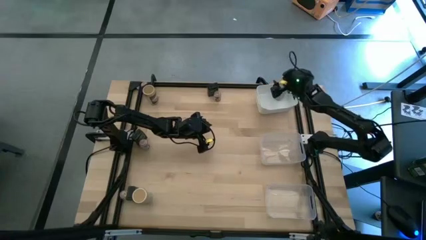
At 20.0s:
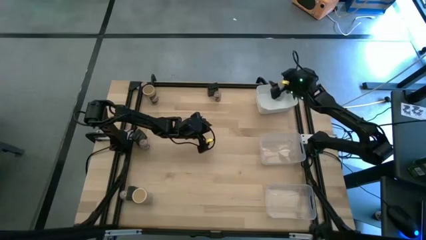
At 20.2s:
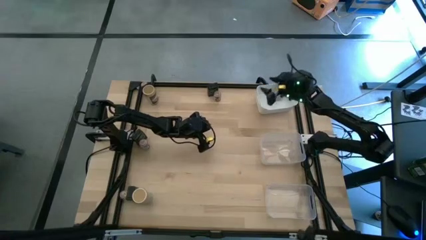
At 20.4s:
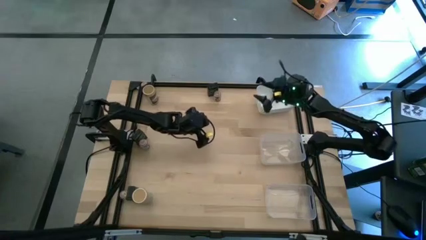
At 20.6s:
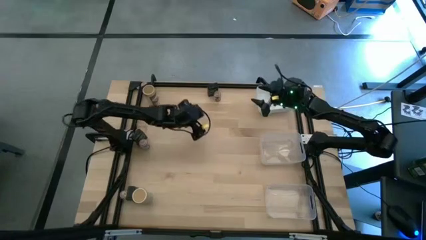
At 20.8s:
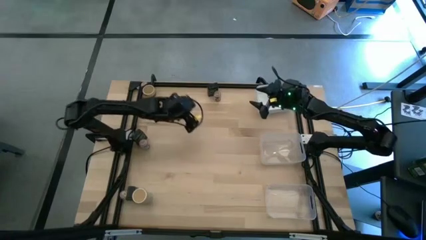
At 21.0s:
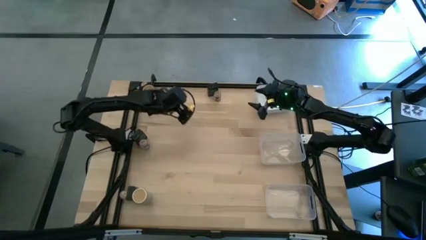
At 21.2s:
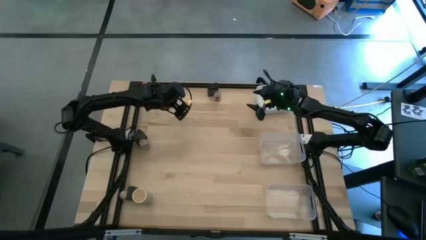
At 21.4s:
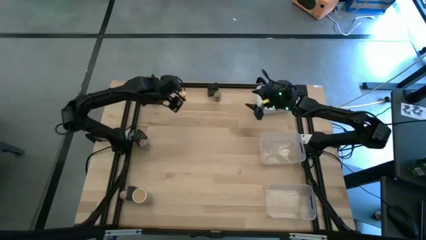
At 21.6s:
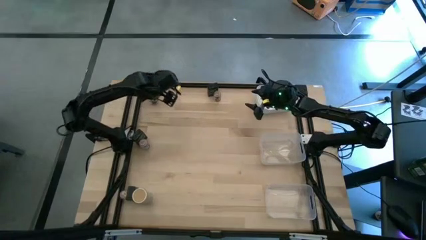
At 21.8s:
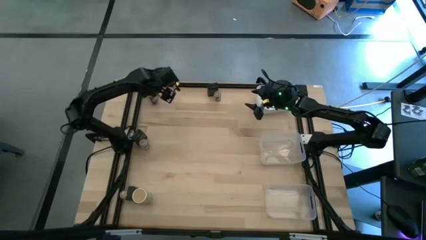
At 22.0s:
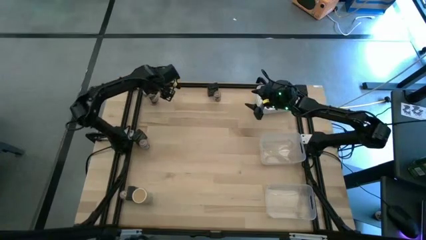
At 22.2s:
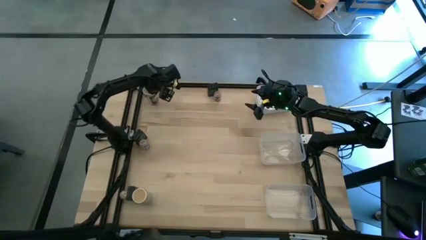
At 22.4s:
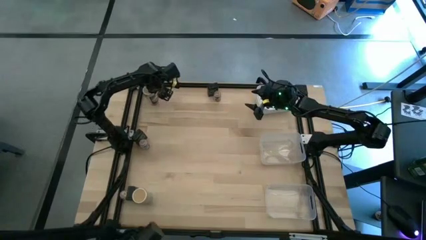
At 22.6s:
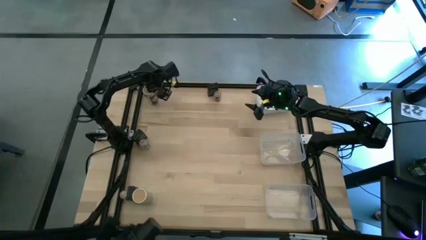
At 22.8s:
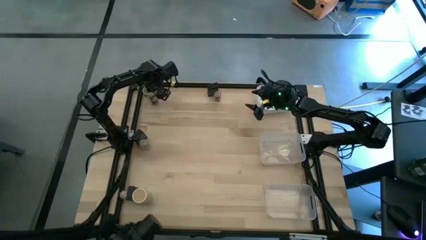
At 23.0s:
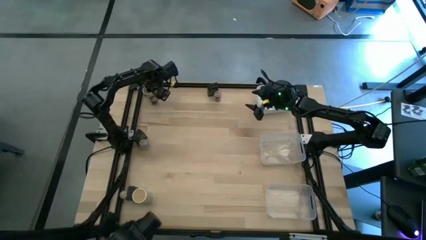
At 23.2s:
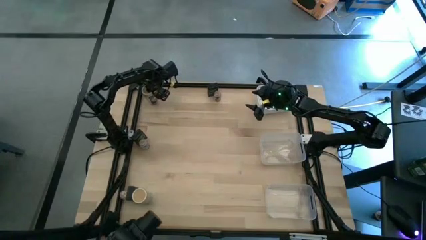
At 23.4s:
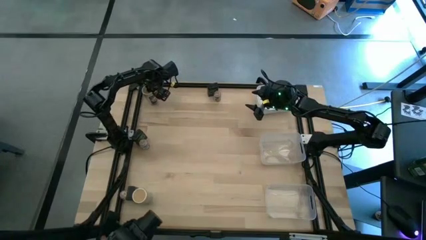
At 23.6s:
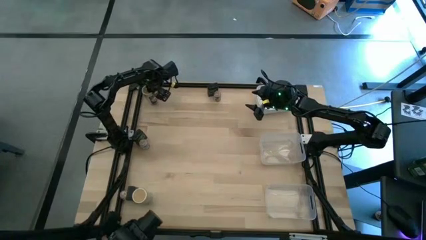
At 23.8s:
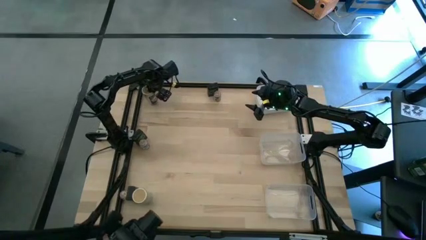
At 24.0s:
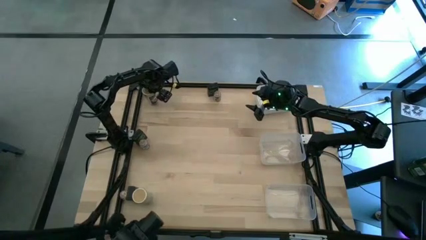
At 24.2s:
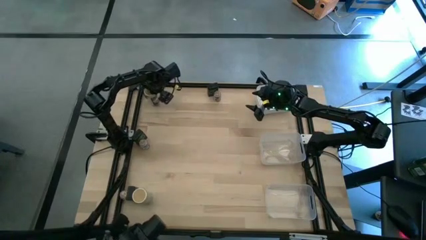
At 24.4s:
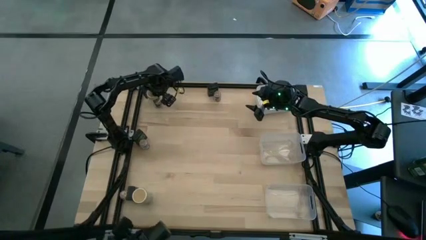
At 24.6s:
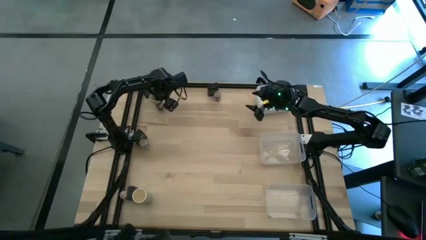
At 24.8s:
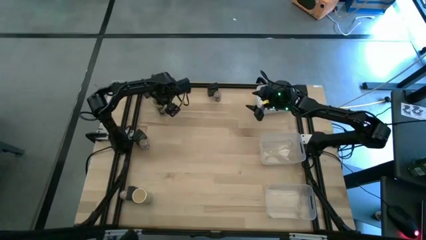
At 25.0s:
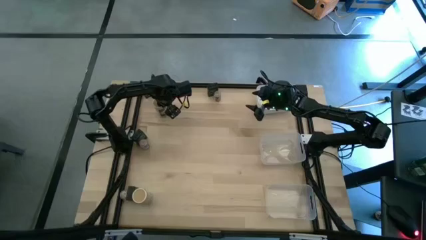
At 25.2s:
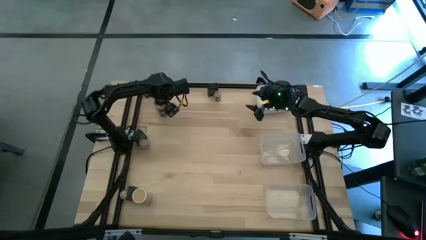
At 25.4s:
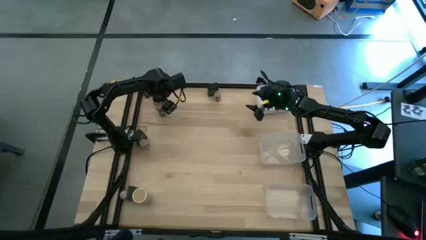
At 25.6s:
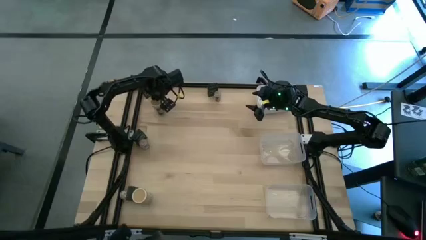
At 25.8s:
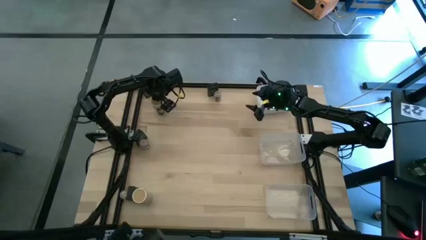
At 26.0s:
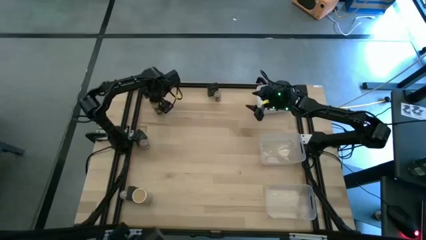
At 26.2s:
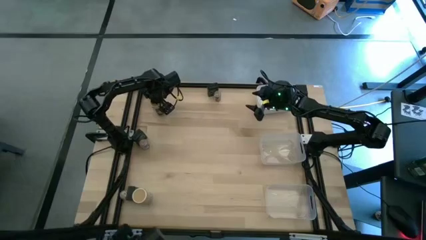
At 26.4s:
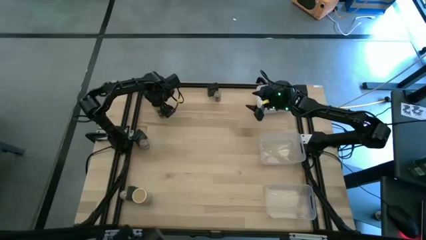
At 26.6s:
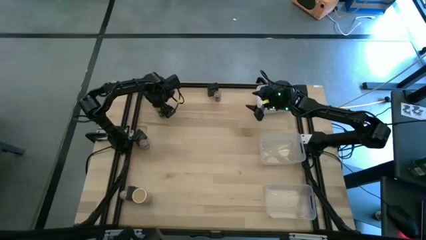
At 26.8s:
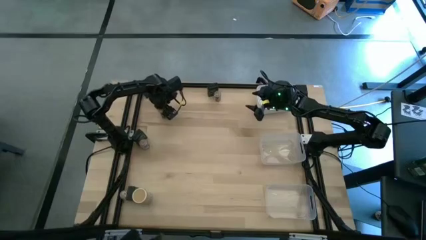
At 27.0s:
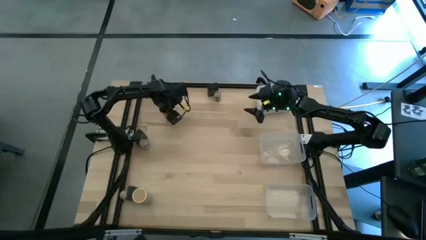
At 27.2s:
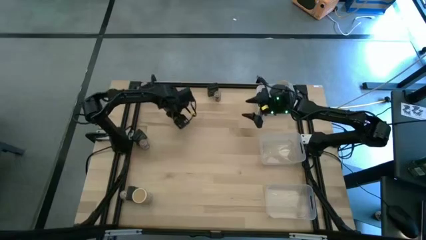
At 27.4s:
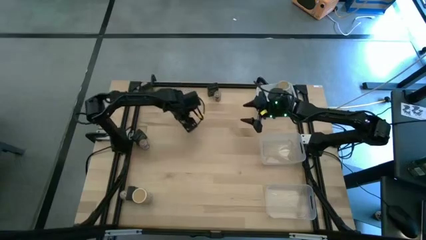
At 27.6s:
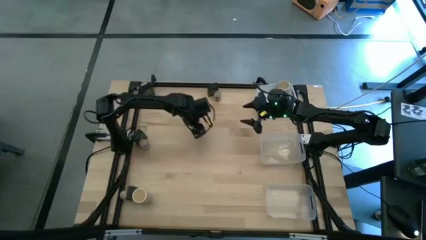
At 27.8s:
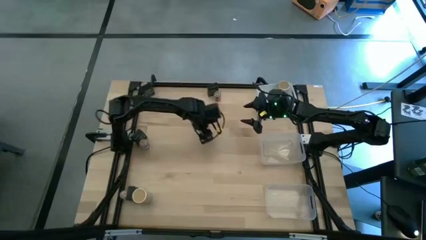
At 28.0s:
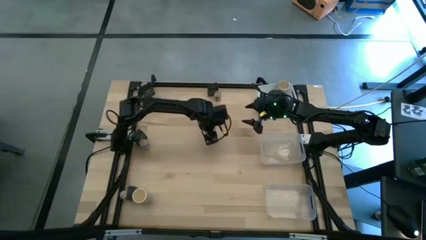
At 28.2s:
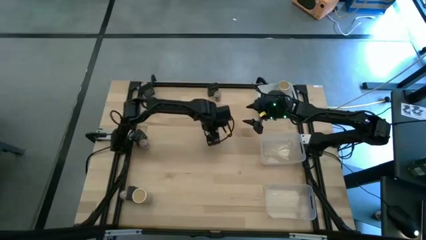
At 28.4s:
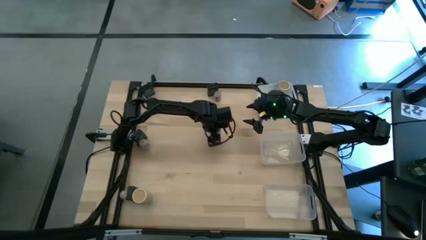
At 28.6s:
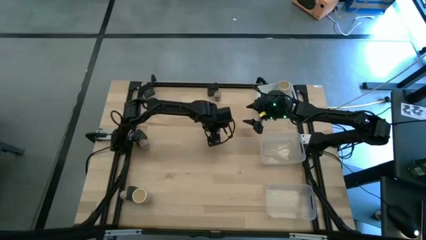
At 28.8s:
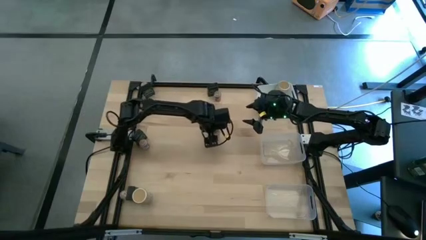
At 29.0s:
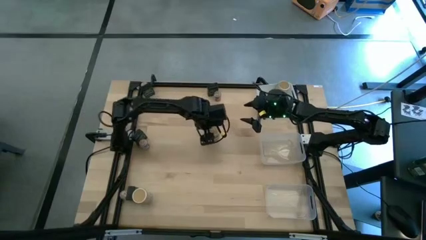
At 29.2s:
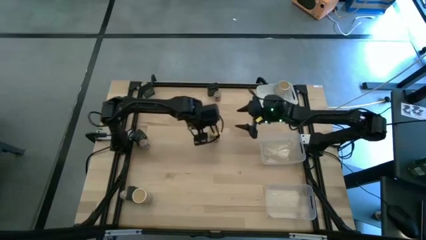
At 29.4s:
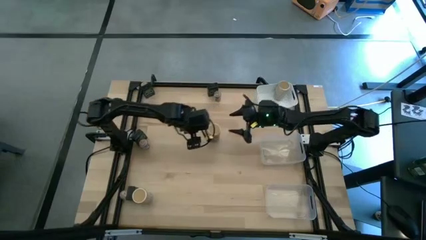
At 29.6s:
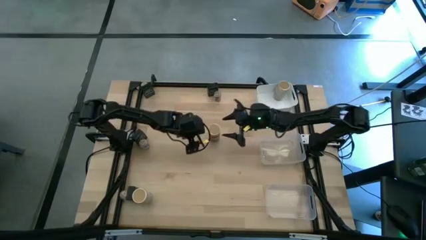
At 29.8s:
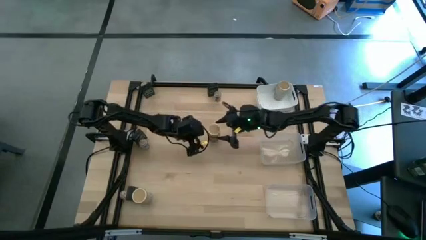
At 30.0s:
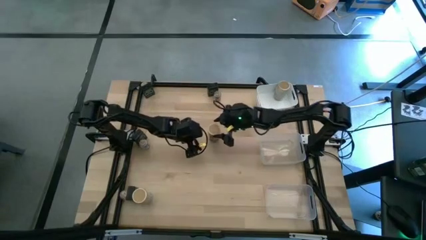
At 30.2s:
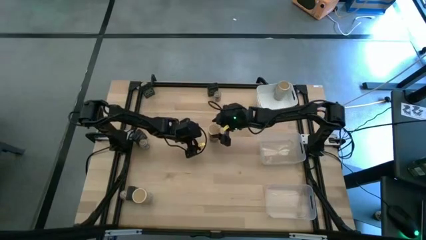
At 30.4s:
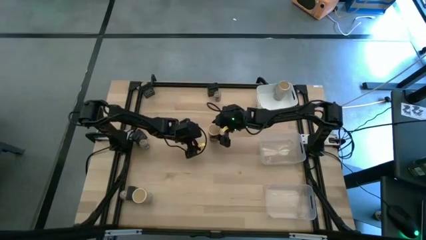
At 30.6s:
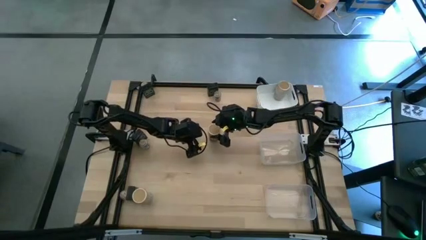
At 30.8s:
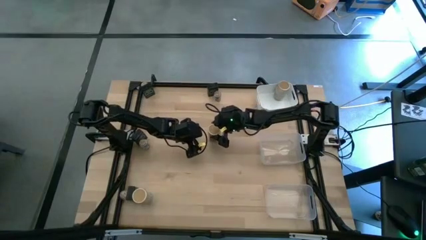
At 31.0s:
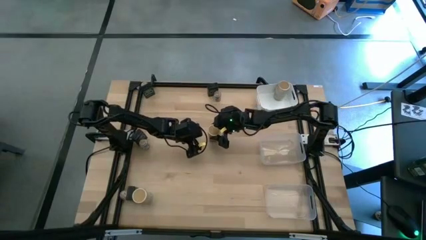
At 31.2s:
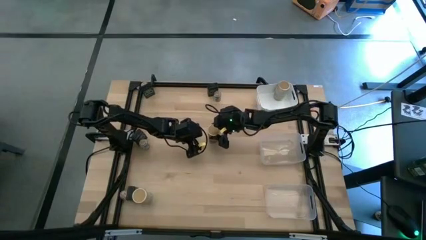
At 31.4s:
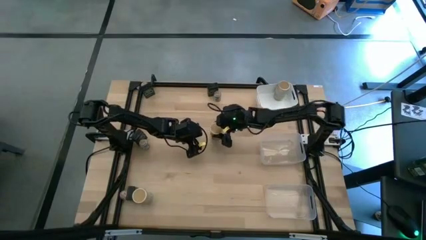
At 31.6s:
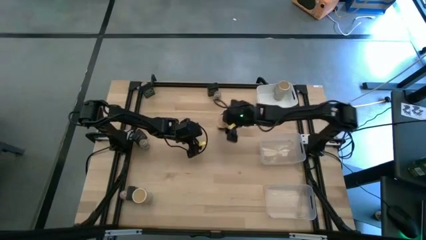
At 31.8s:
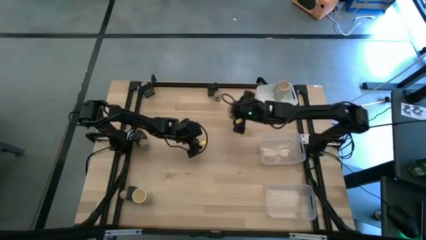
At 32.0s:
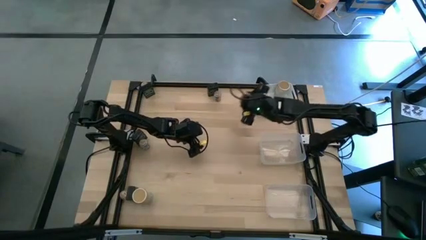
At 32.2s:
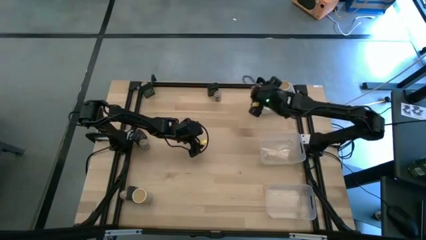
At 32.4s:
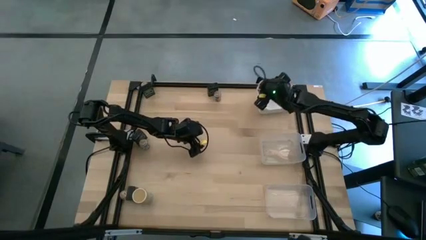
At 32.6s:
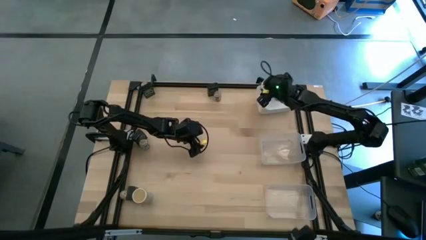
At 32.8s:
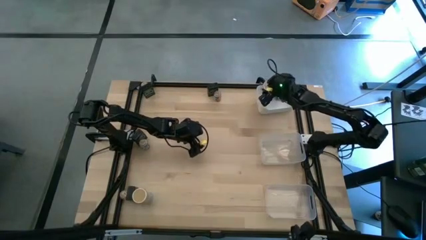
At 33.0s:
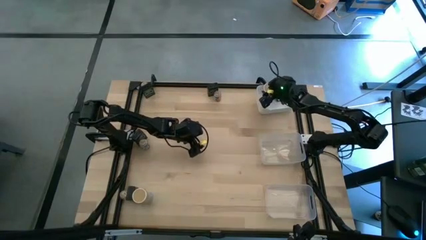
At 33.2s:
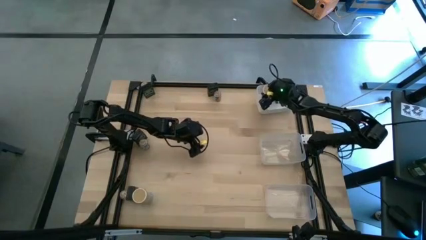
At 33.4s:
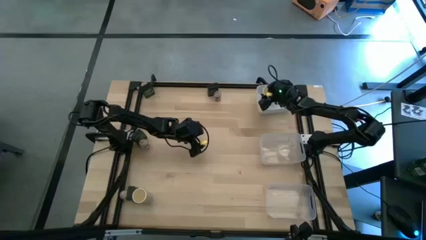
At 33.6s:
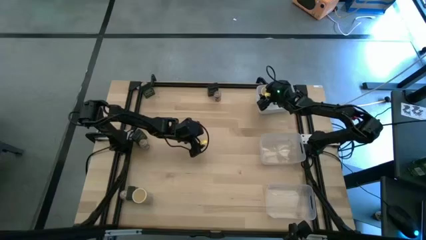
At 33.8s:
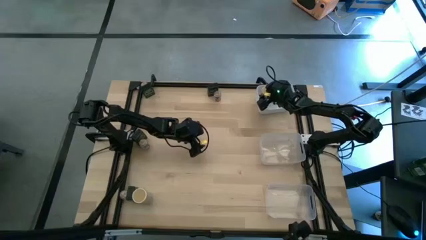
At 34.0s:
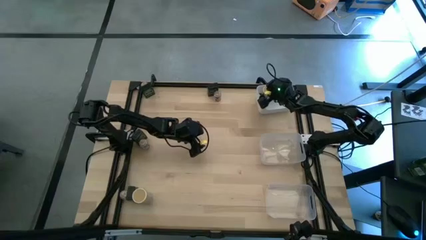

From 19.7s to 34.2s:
Task: Sort spices by type
Put the top brown seasoning bottle into the white bin

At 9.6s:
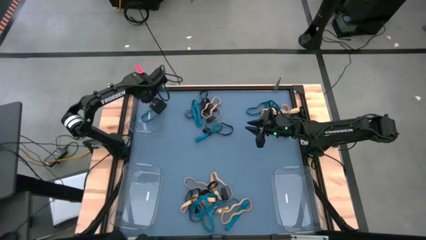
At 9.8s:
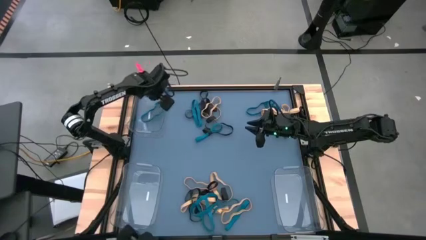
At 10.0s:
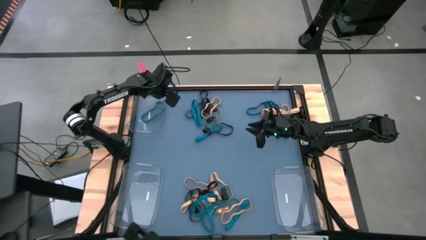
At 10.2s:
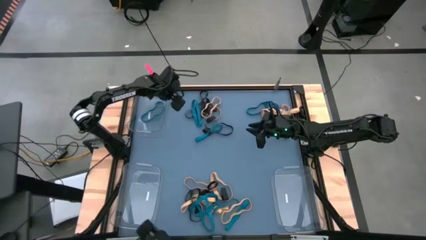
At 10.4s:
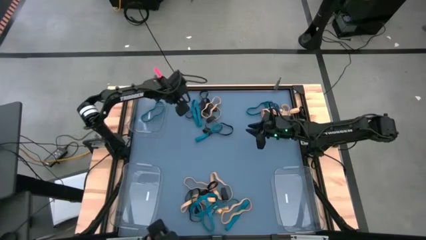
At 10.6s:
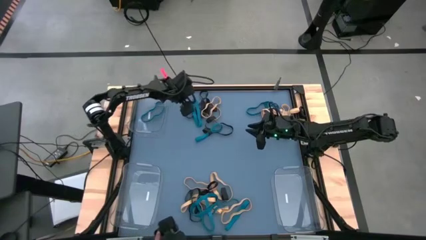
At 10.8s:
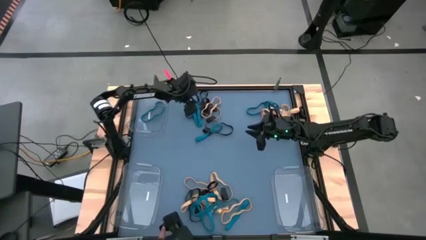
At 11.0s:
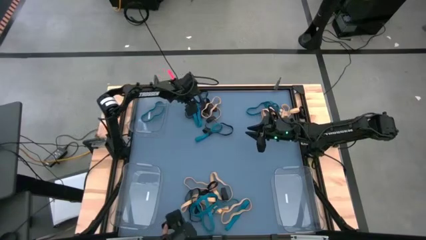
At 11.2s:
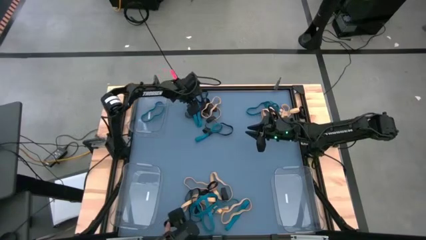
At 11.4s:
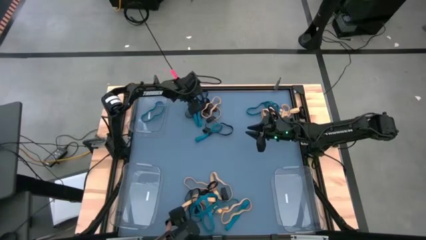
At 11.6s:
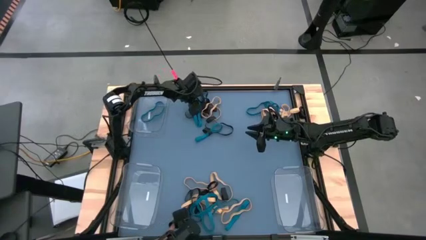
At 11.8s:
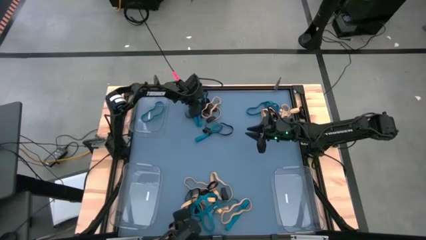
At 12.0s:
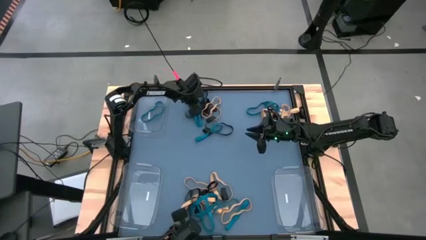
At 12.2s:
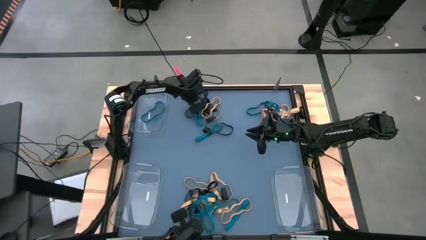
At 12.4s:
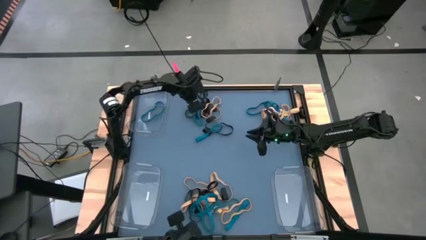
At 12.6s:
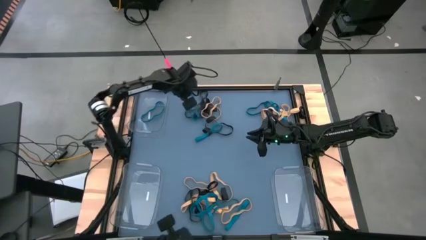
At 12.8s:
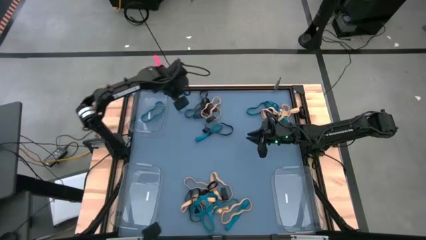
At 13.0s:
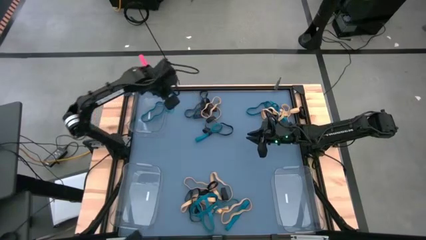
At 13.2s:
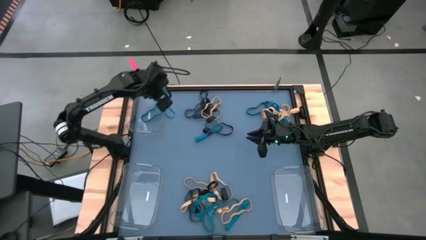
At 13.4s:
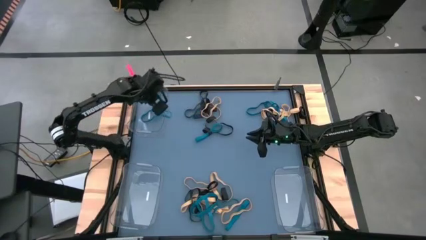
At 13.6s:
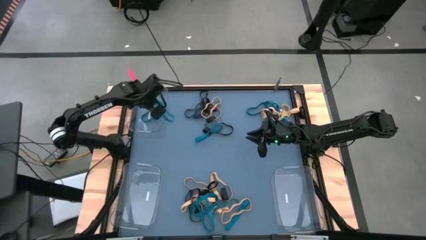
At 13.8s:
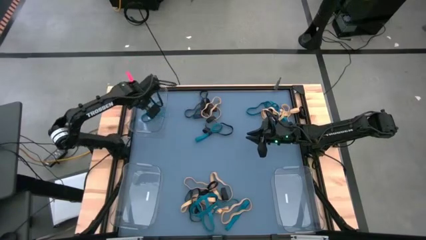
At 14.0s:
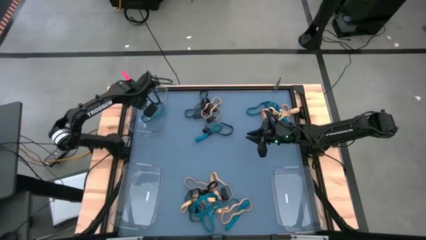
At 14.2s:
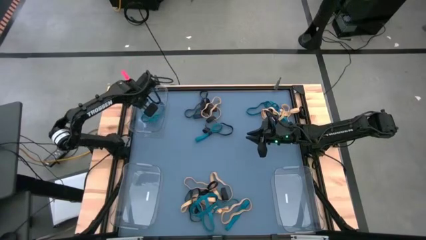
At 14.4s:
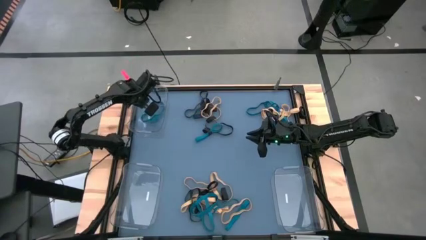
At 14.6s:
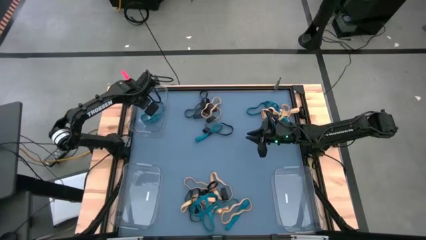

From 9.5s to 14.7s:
Task: Sort rubber bands into baskets
Put the blue rubber band into the top transparent bin
